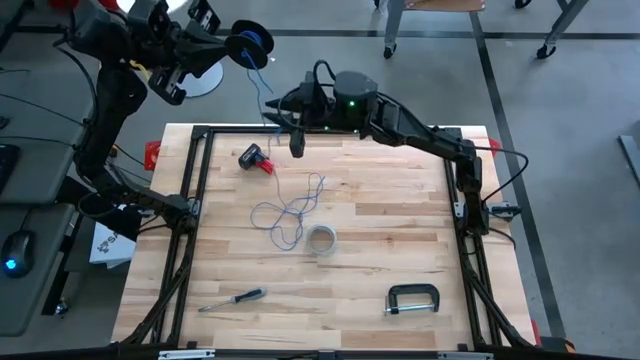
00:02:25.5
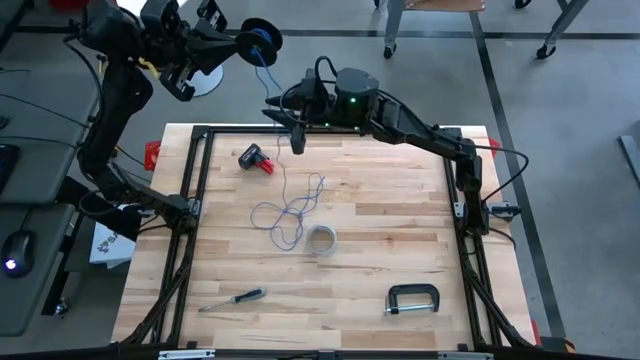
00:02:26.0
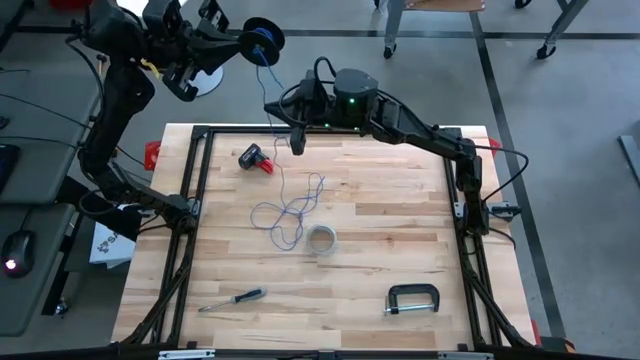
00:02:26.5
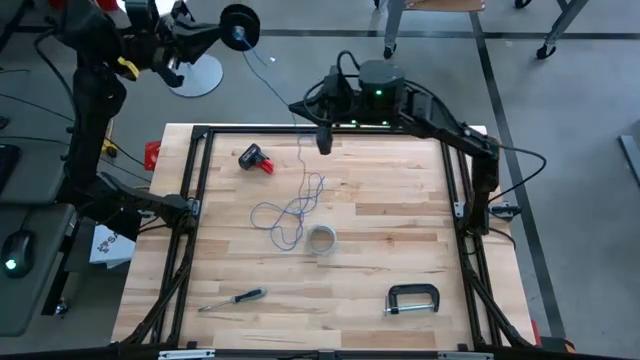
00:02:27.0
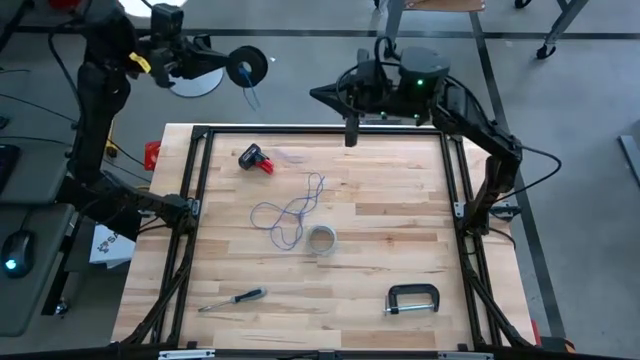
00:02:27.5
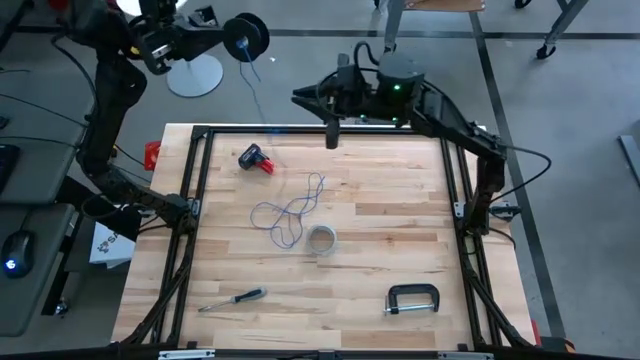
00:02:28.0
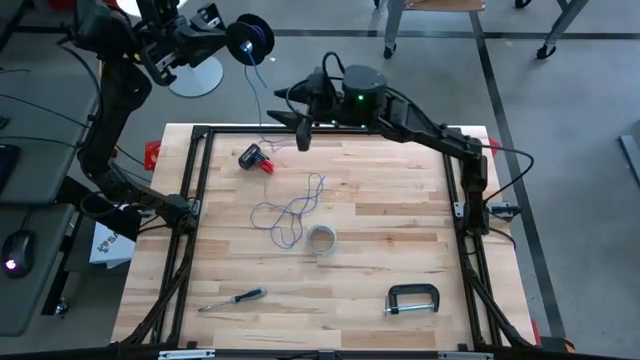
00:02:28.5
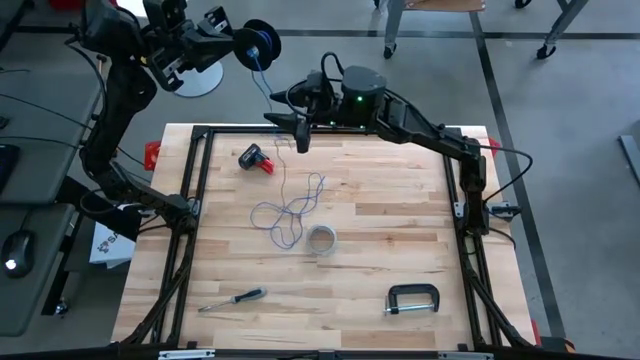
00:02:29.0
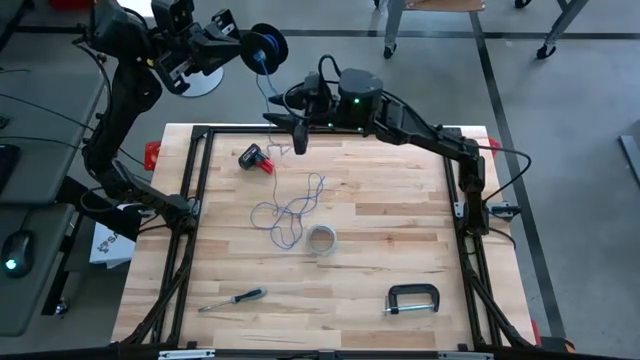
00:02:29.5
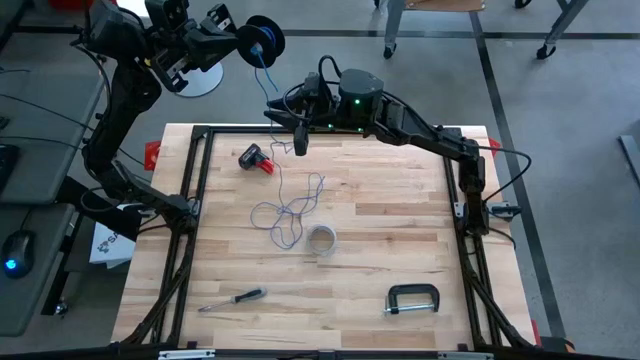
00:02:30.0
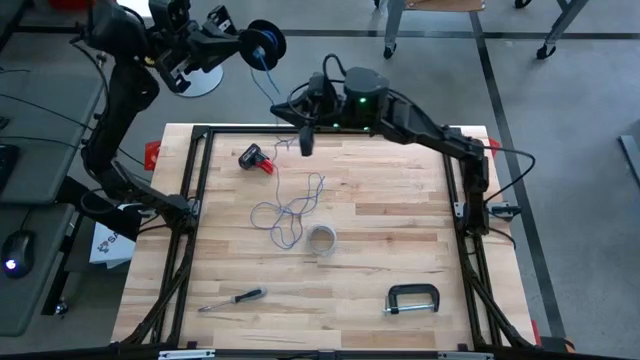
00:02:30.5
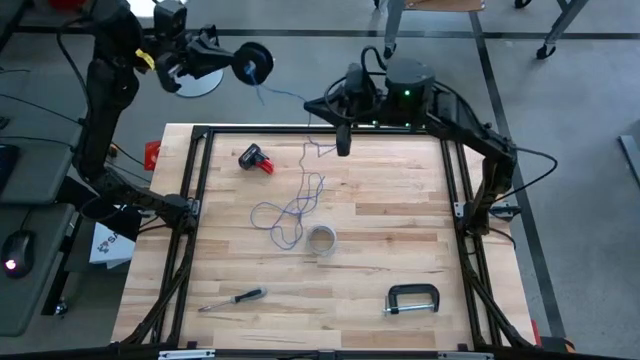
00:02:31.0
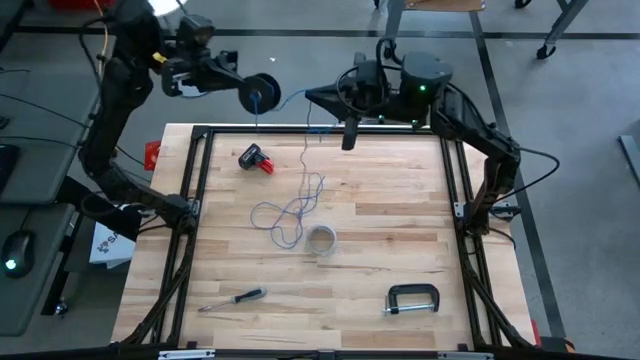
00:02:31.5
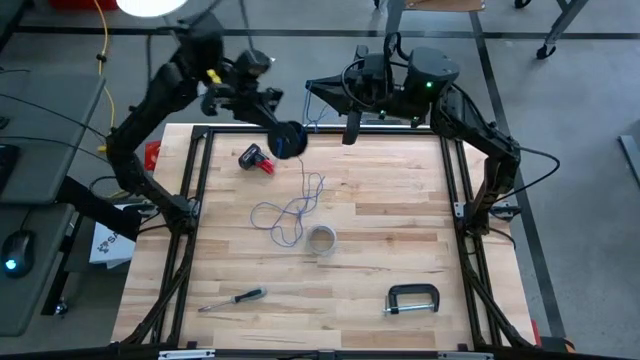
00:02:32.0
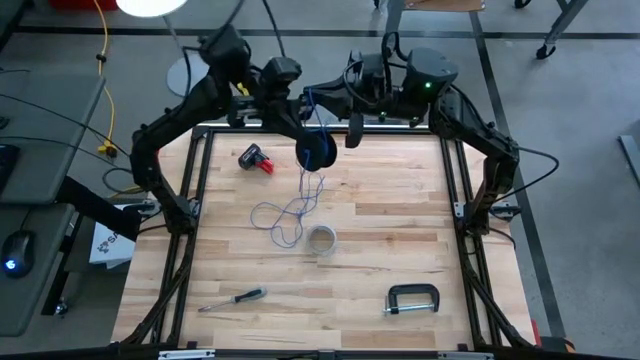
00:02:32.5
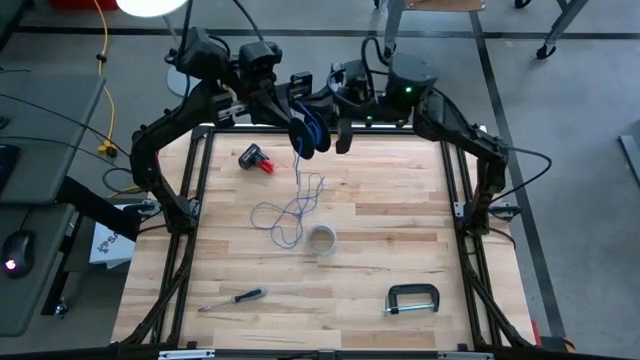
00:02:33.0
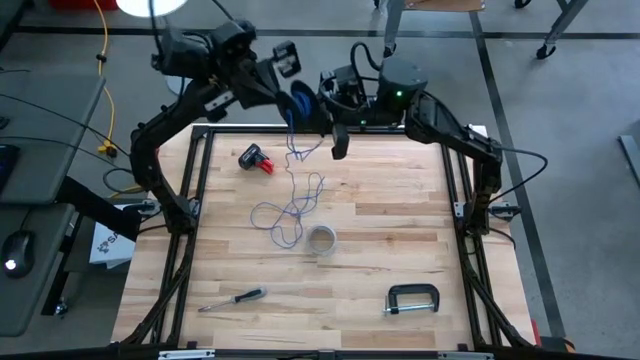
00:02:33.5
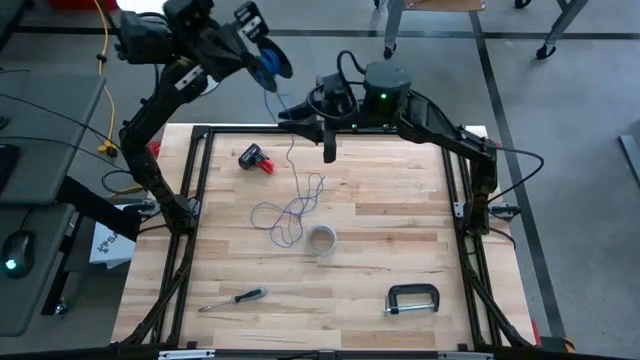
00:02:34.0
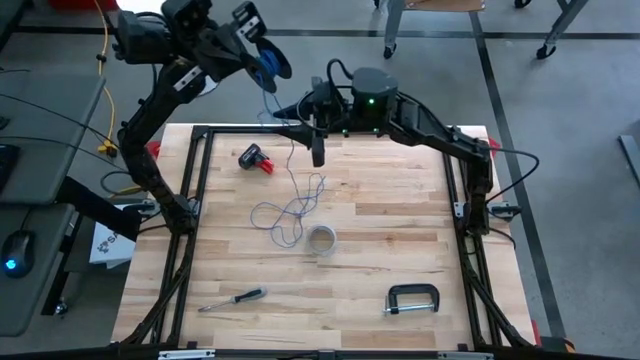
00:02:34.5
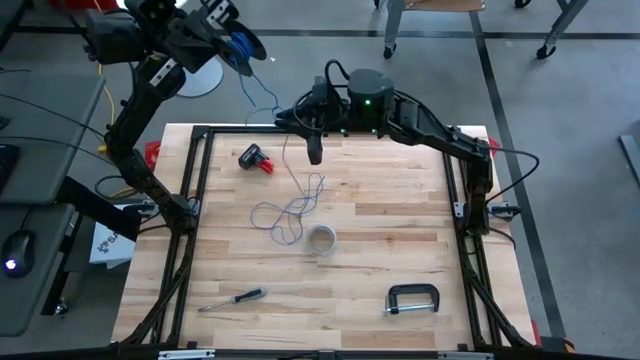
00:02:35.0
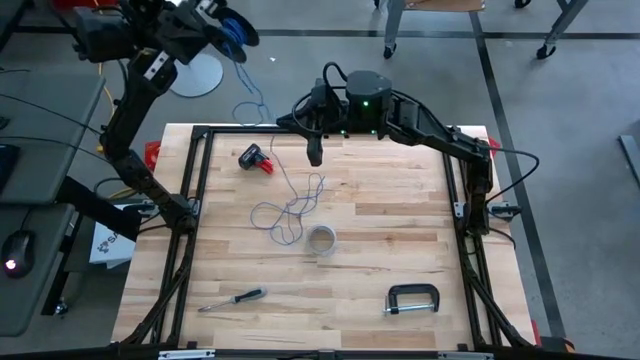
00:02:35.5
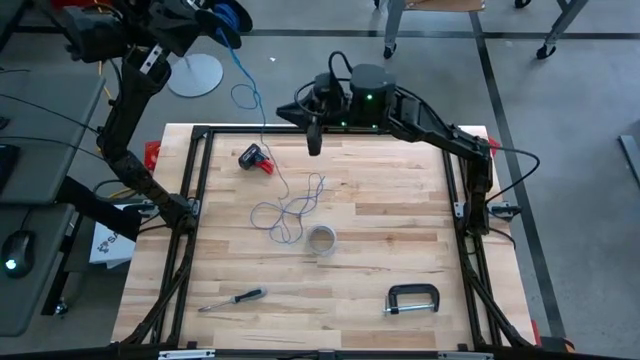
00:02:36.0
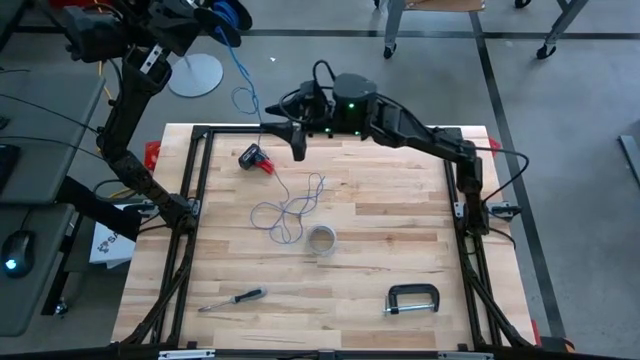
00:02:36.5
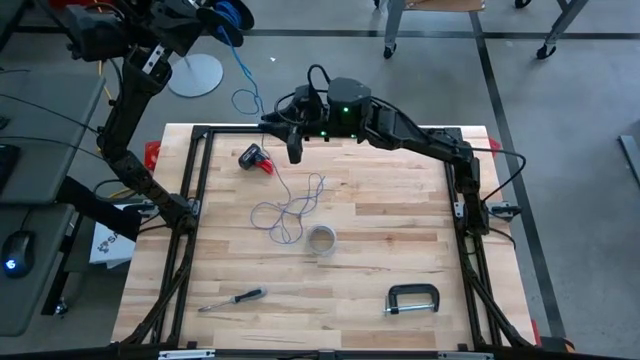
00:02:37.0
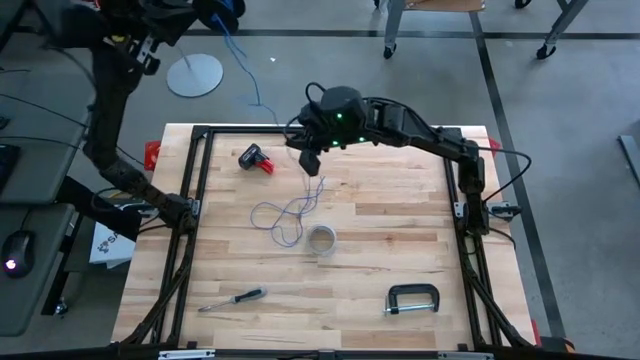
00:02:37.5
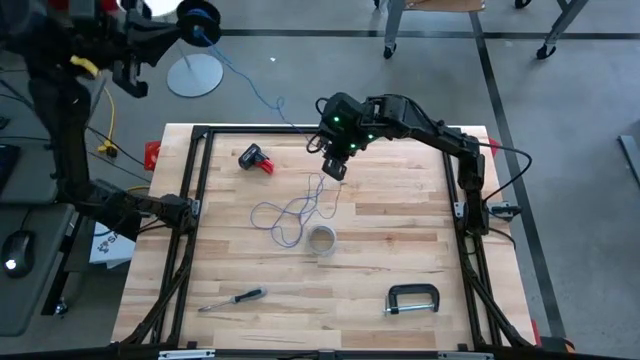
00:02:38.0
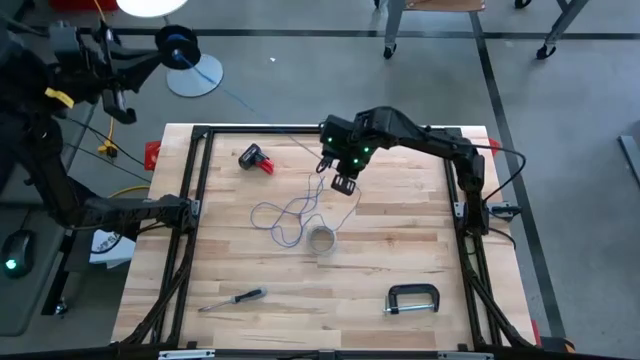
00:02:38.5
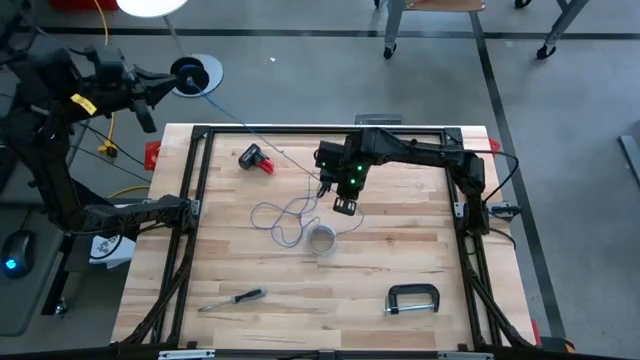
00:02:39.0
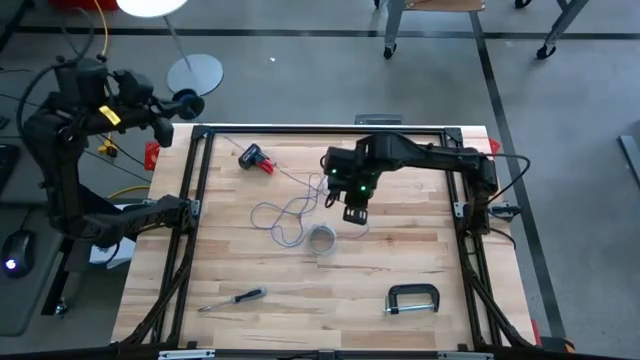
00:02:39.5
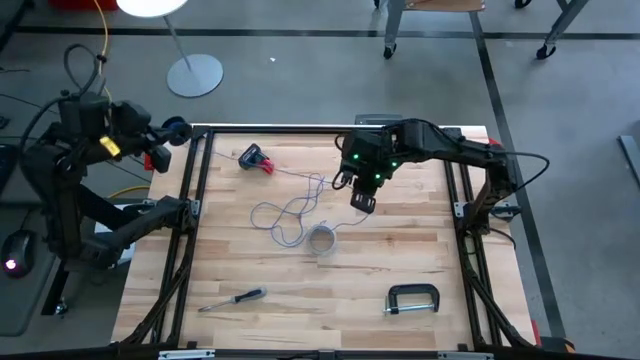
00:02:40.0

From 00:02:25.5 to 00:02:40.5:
Task: Coil cords
Coil the blue wire on the spool

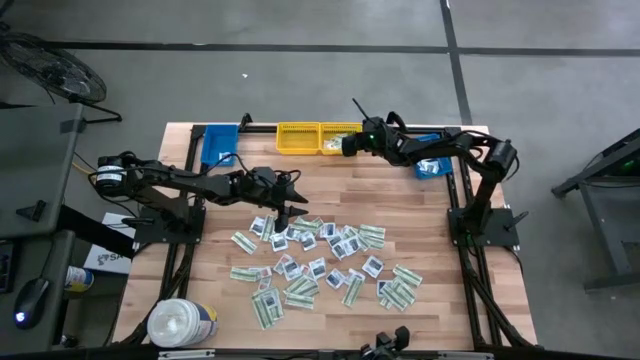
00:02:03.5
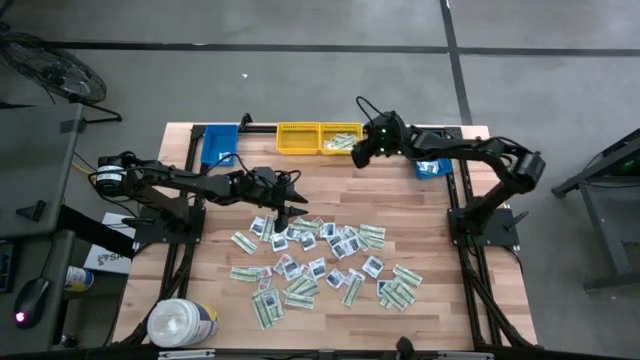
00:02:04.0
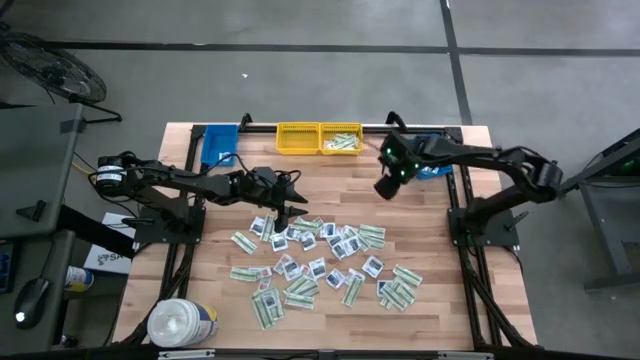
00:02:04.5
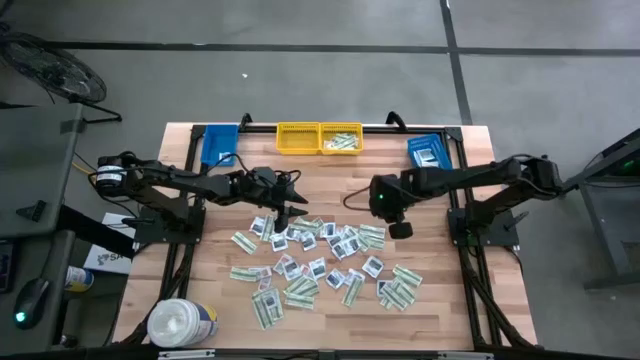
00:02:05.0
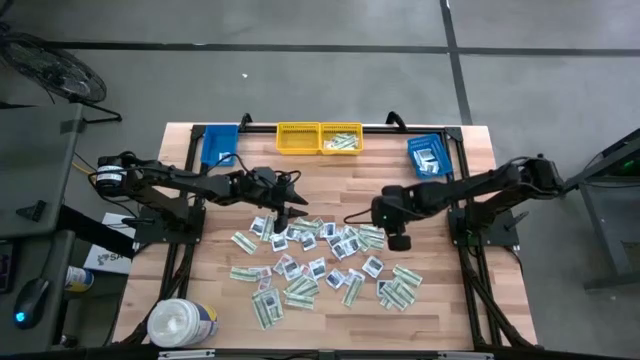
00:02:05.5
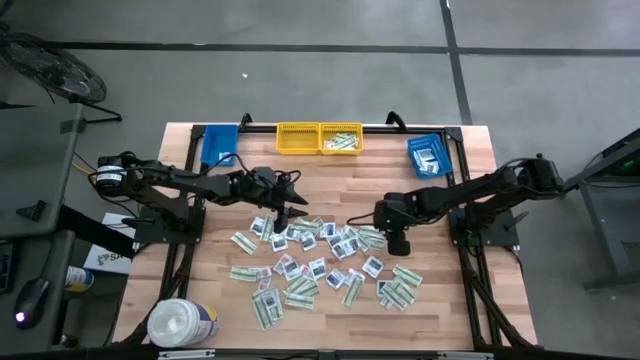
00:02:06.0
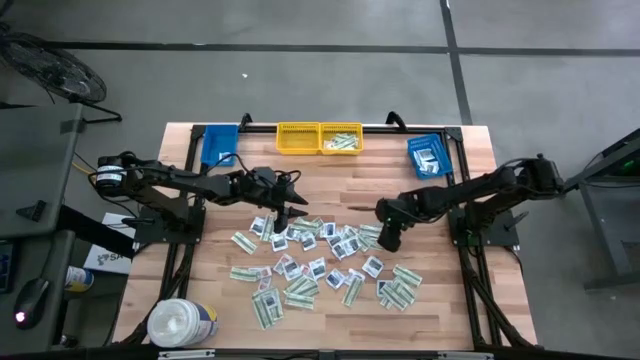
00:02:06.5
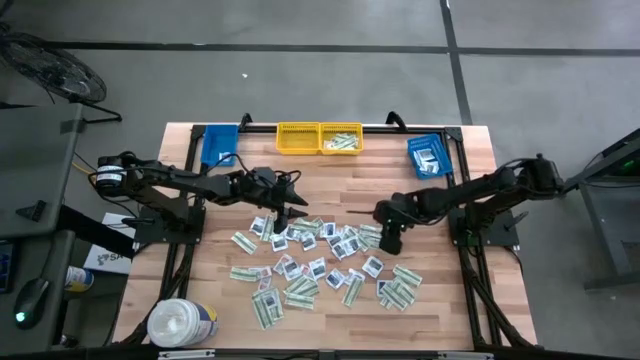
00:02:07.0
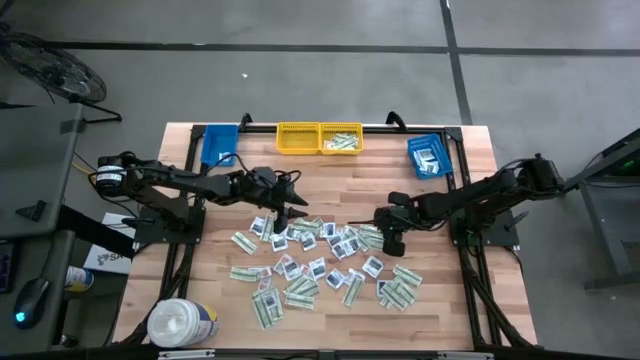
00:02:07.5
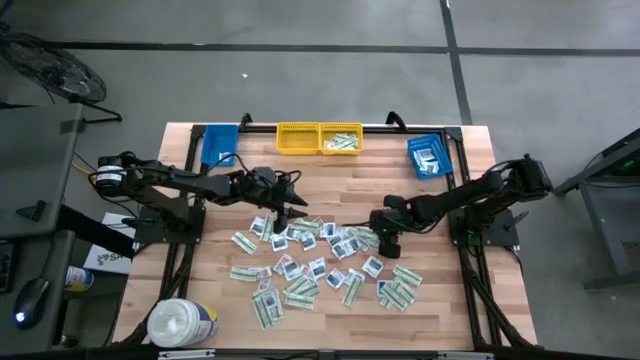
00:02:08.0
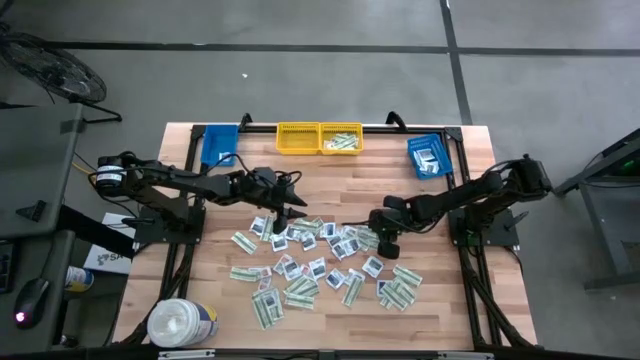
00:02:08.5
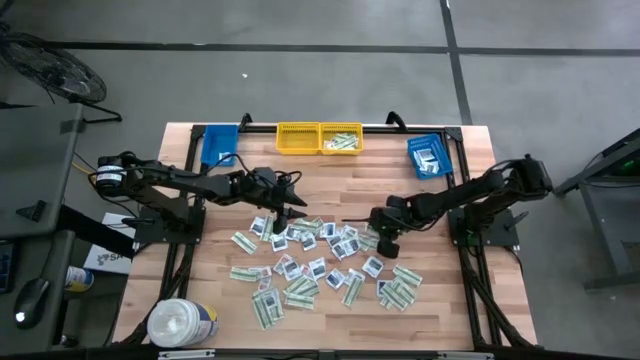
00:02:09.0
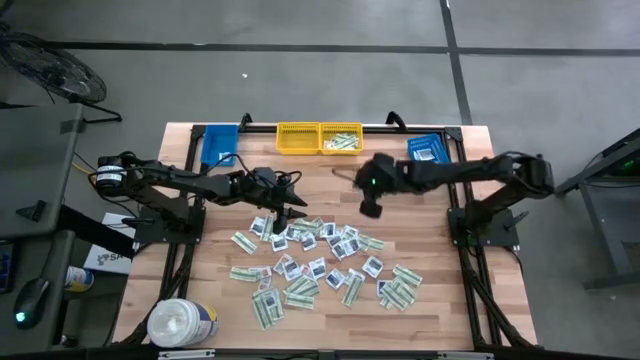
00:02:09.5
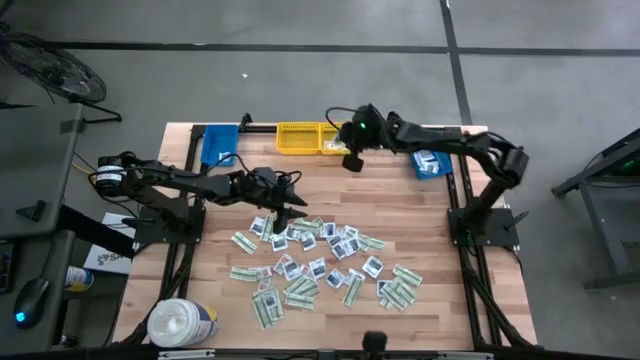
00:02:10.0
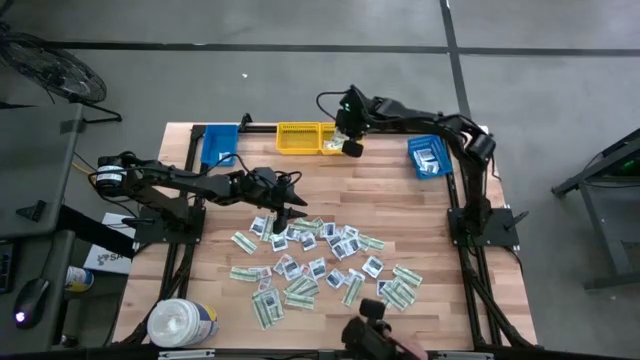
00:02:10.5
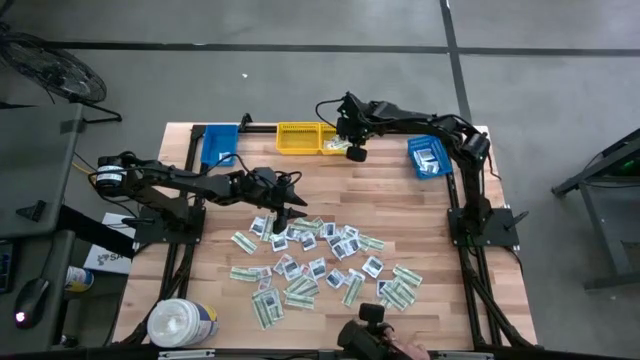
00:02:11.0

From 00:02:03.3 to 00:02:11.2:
Task: Pick & Place First Aid Supplies
Put the green bandage pack into the right yellow bin
